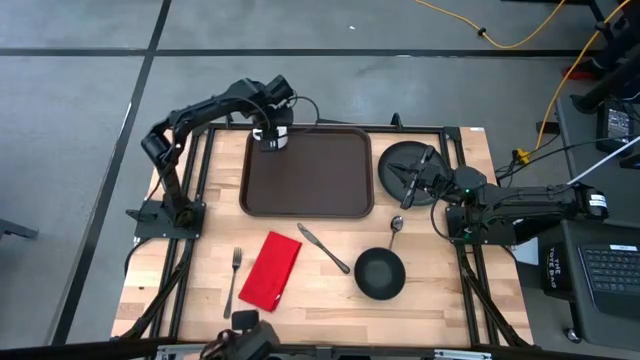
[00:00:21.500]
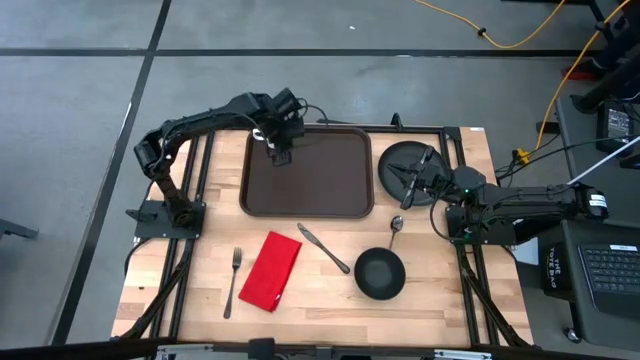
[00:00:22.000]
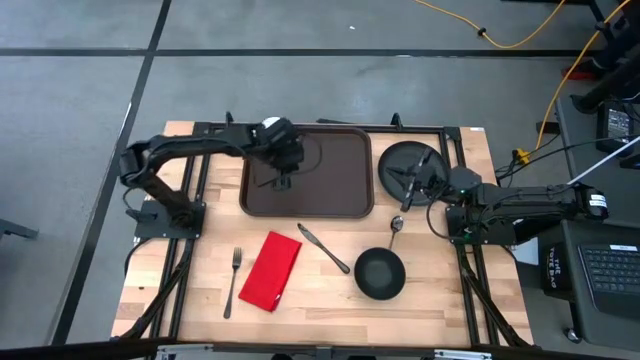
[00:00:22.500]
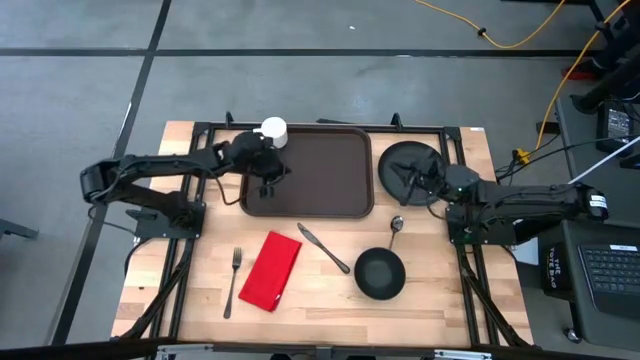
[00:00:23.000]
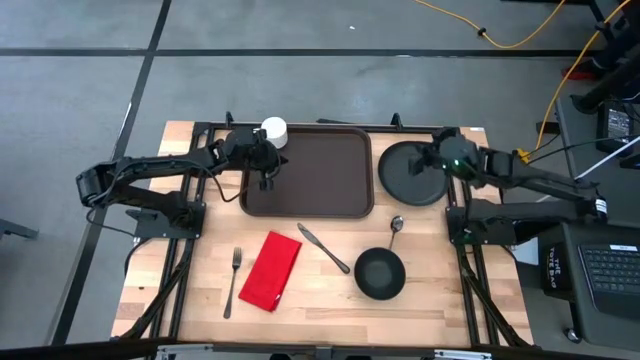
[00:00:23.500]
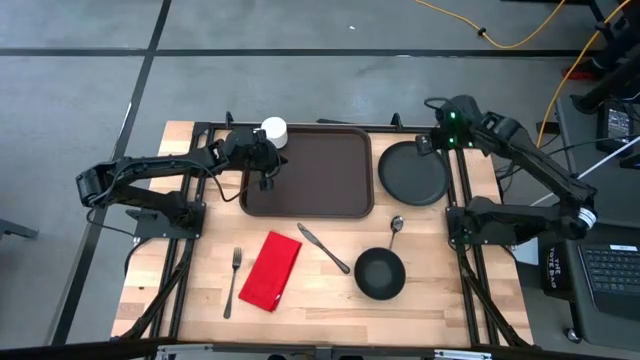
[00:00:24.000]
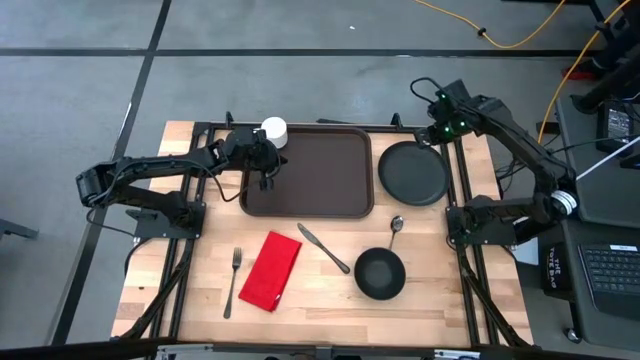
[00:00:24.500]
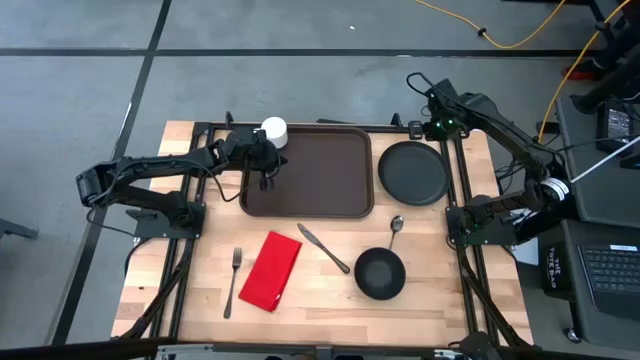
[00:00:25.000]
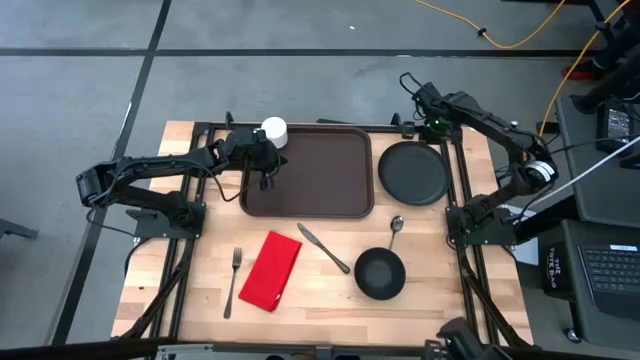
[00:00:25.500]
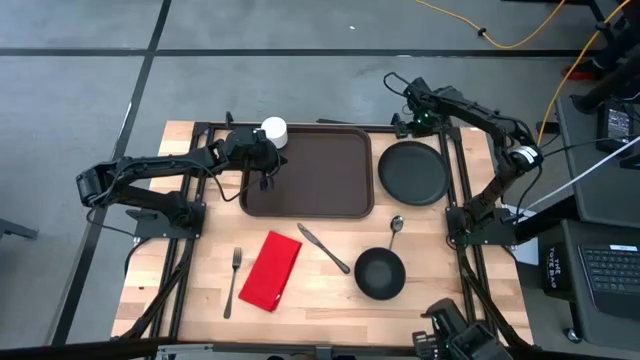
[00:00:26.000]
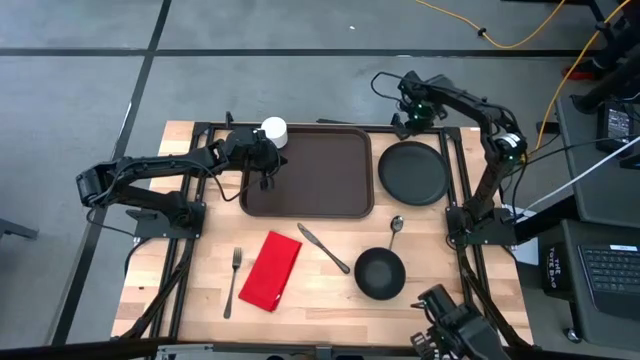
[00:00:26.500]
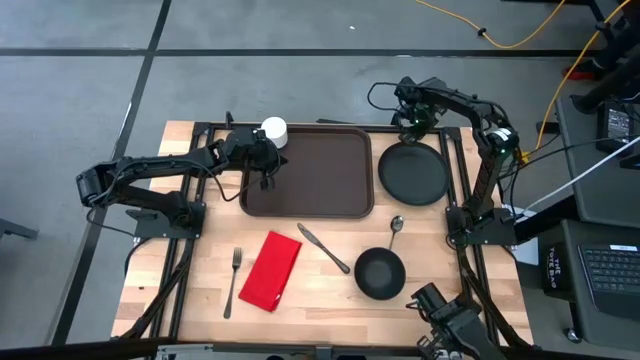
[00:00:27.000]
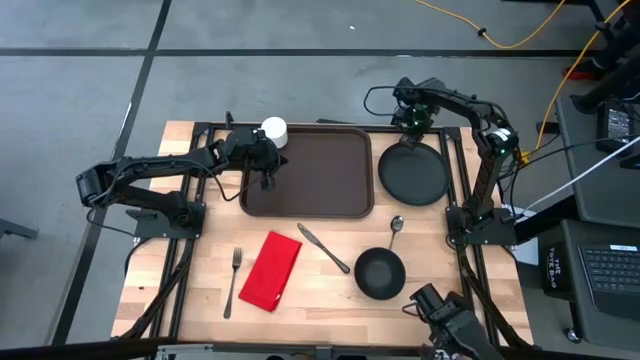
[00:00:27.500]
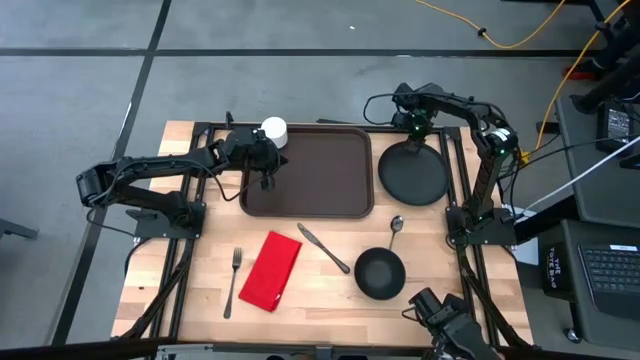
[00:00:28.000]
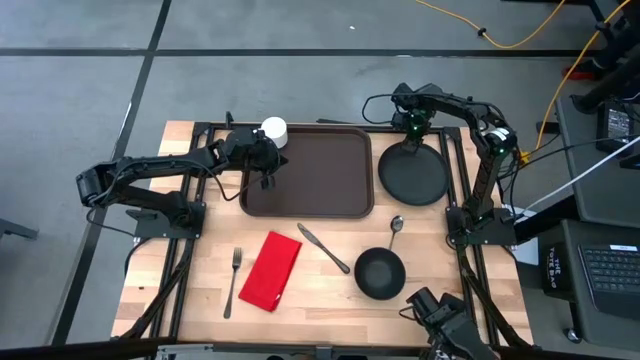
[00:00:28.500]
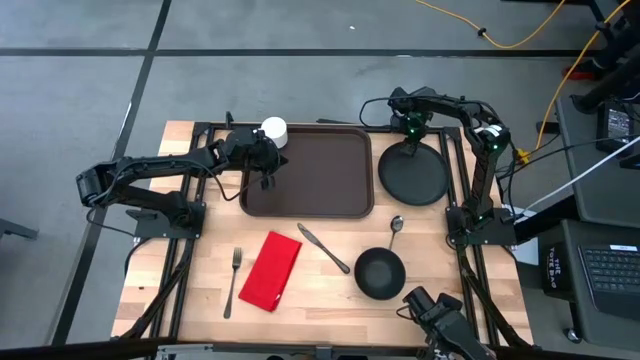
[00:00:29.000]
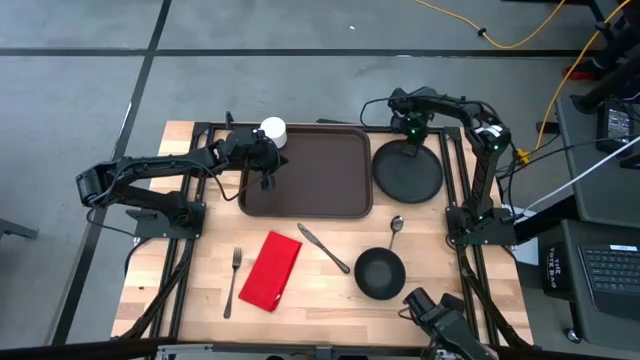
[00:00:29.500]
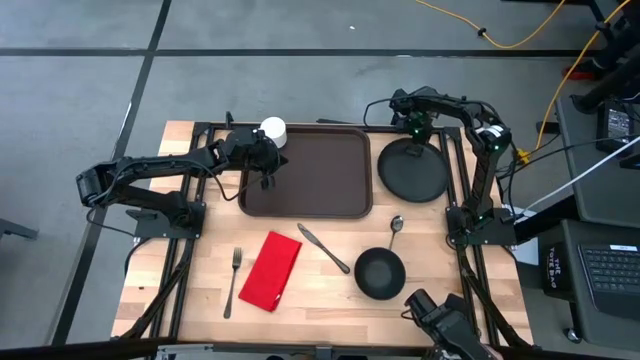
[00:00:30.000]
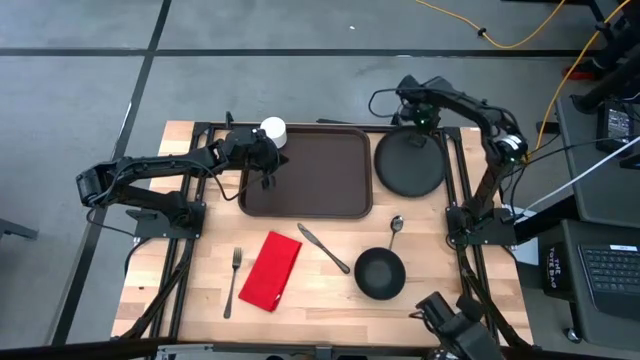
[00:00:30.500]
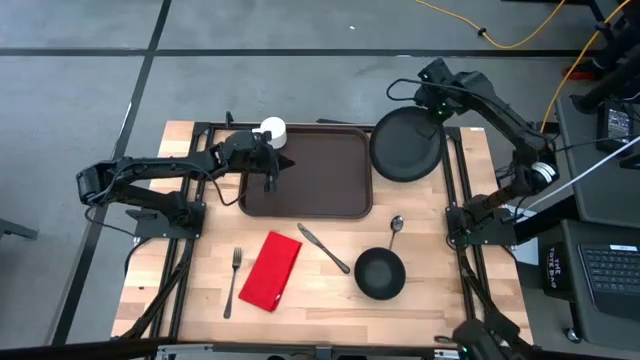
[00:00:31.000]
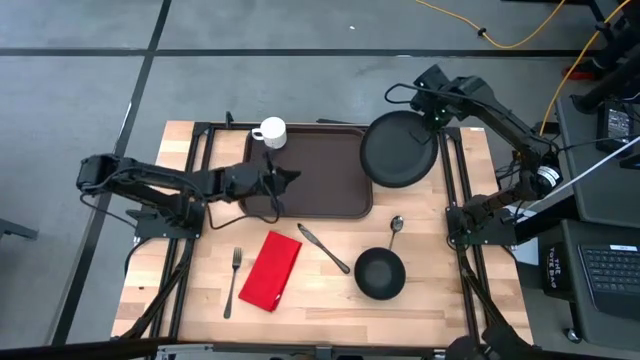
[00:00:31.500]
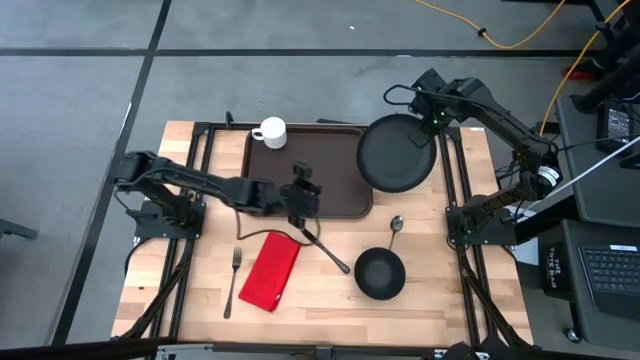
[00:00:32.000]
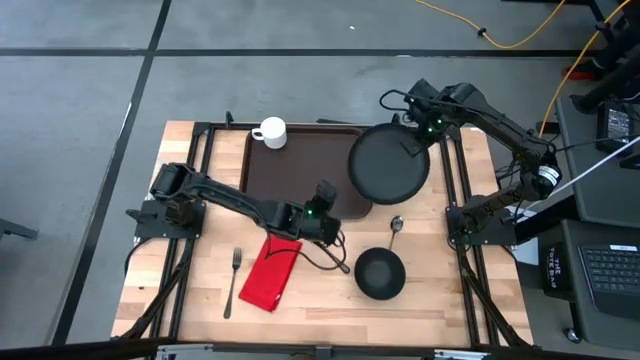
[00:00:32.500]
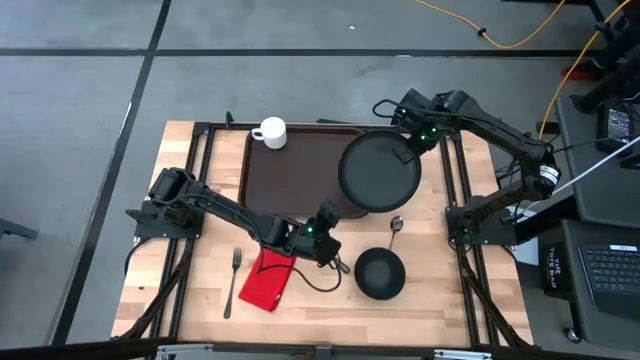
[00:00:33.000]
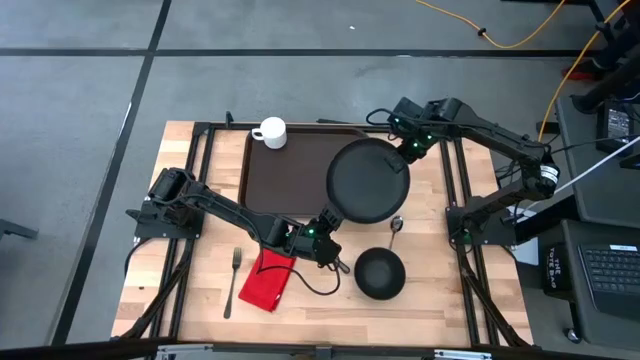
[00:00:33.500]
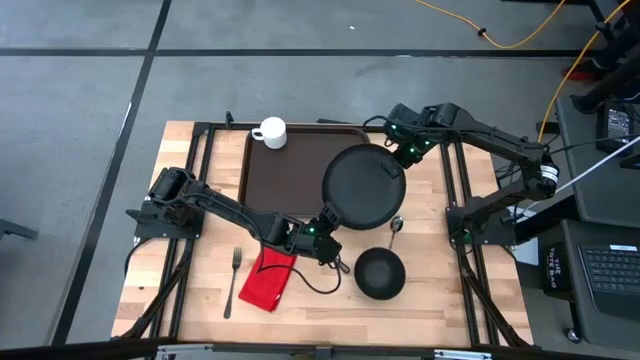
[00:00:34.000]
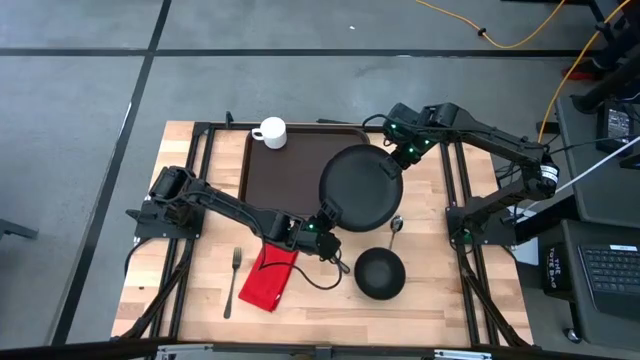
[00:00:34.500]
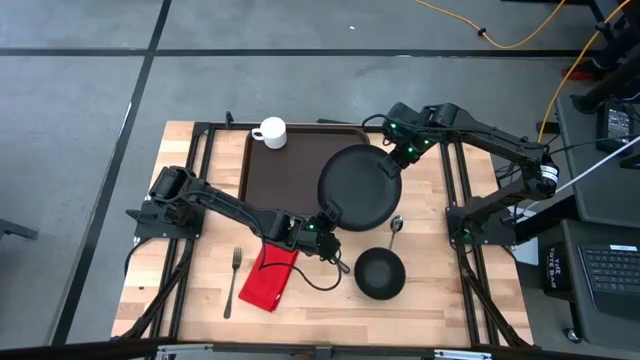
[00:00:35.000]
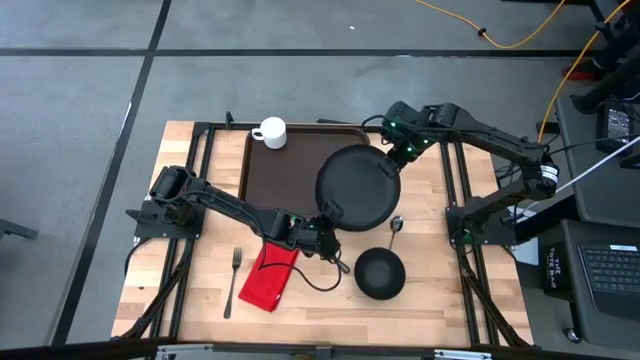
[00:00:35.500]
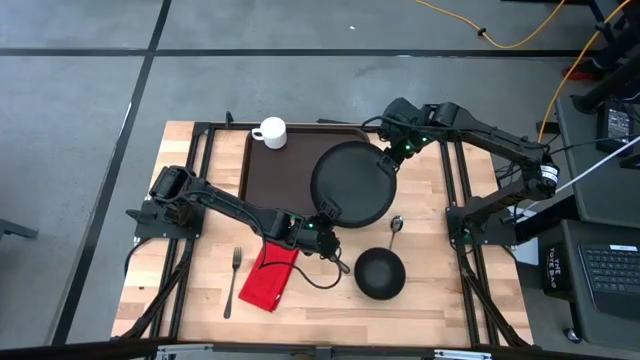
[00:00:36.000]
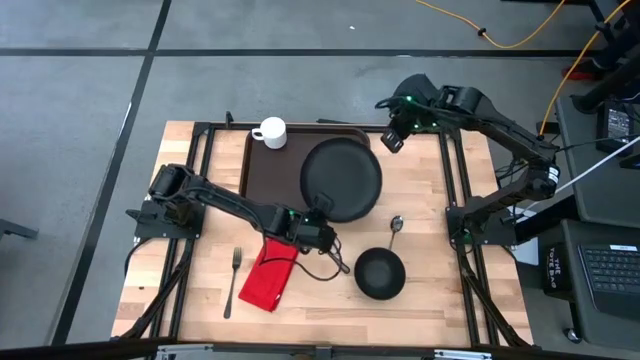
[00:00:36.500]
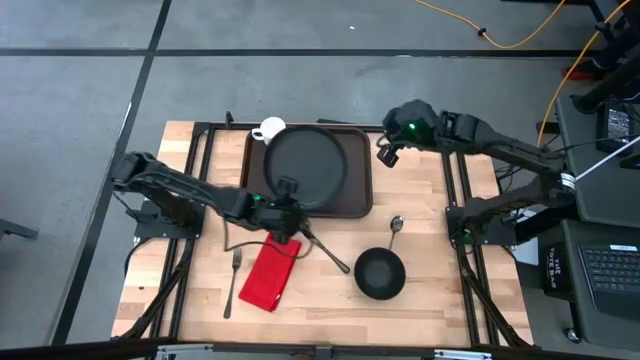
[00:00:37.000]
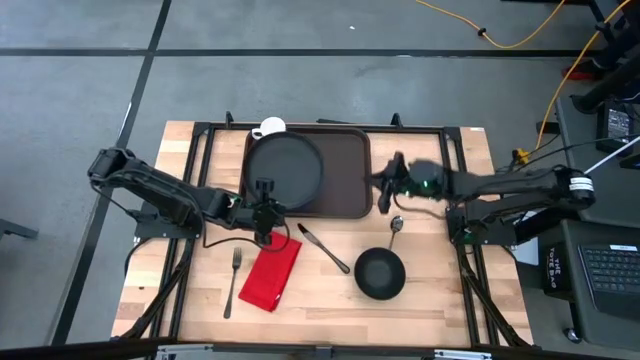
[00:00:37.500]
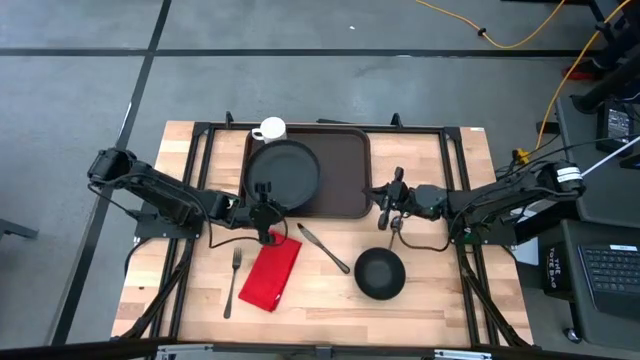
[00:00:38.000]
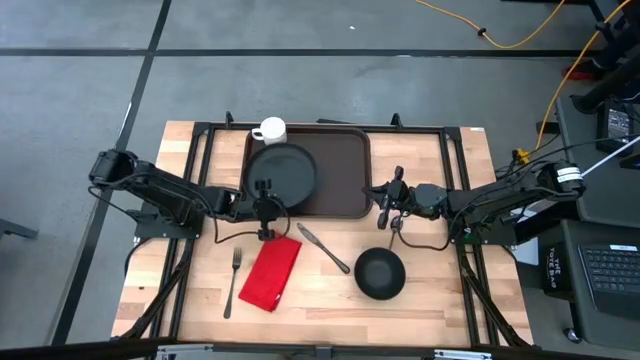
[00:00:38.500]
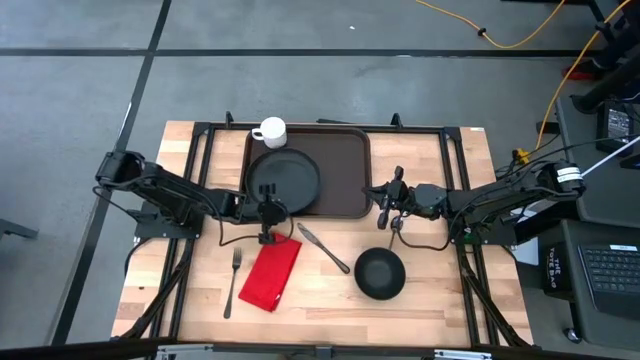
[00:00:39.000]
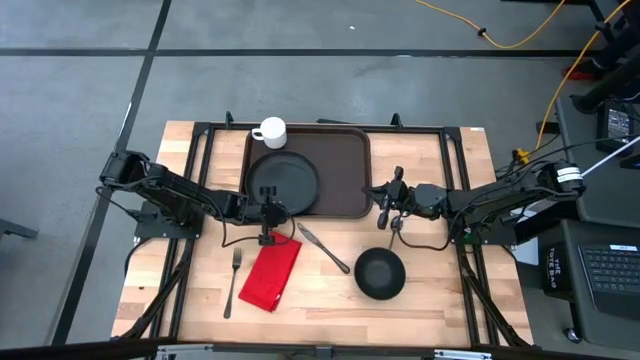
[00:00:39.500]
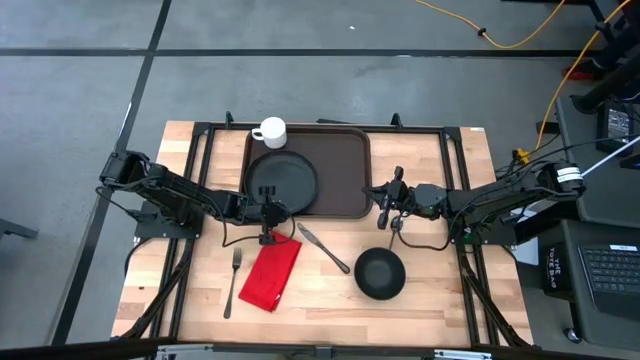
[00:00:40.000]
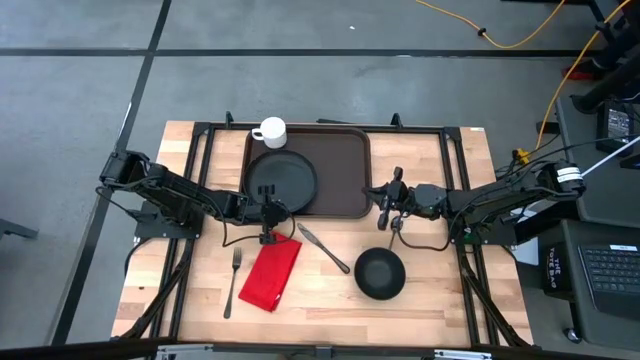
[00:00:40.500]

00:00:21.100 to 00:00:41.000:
Task: Set up tray
Put the black plate on the brown tray below the white mug
